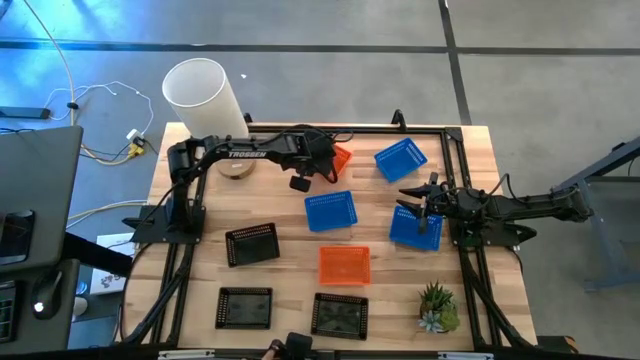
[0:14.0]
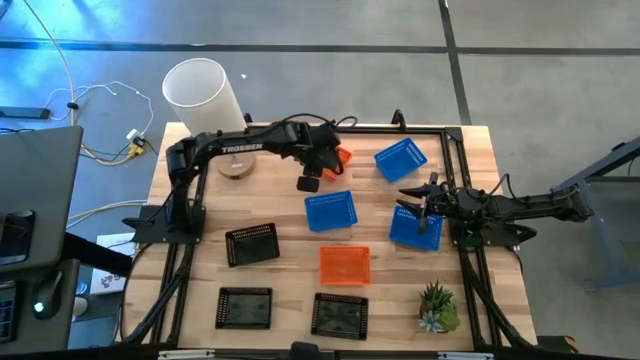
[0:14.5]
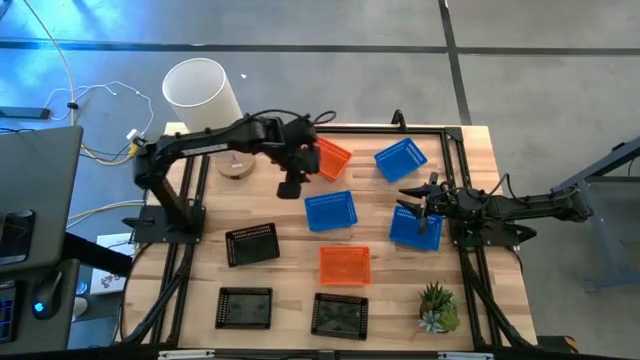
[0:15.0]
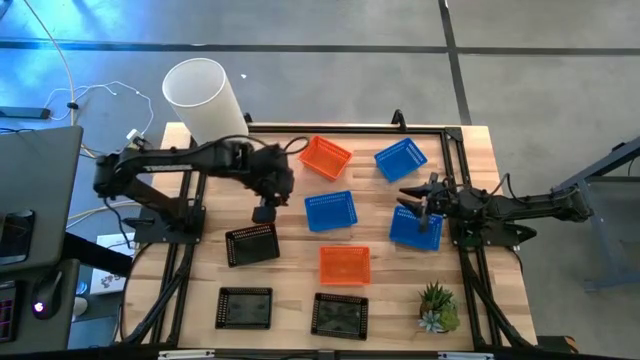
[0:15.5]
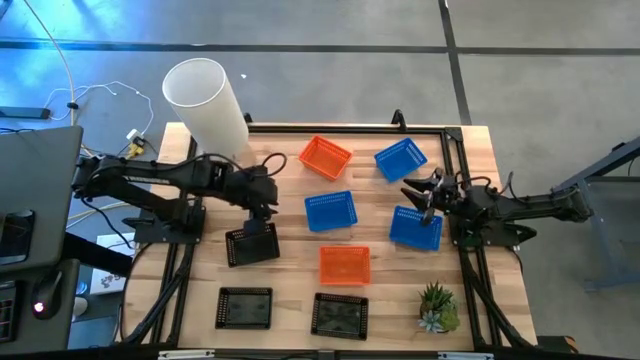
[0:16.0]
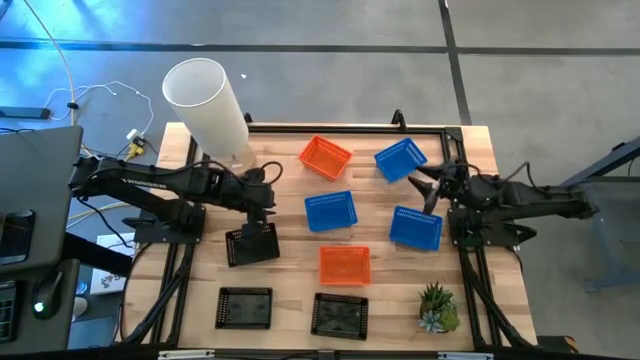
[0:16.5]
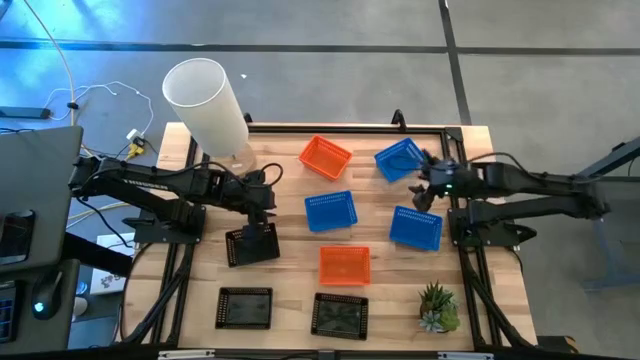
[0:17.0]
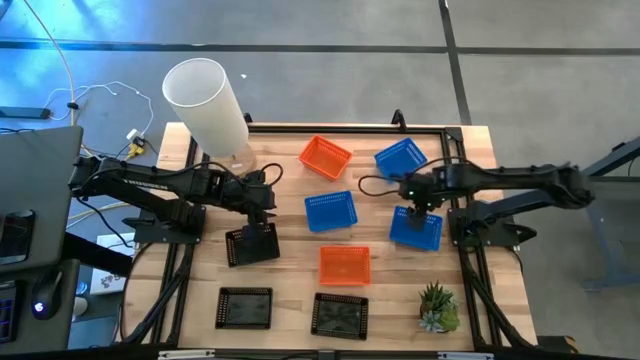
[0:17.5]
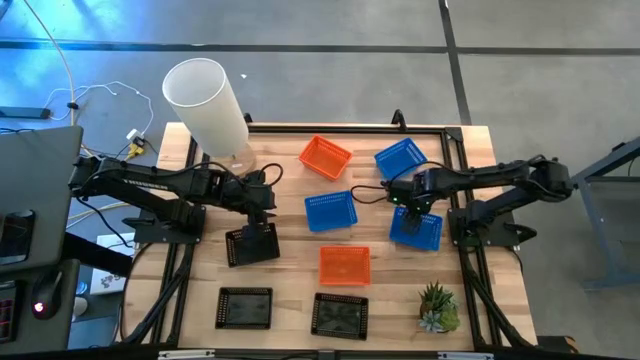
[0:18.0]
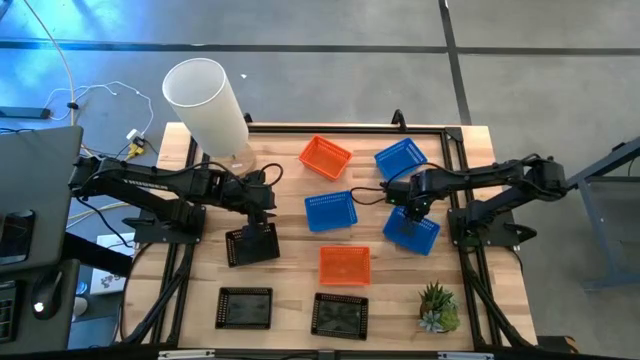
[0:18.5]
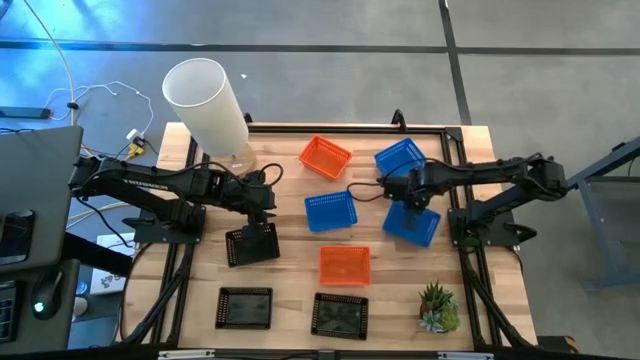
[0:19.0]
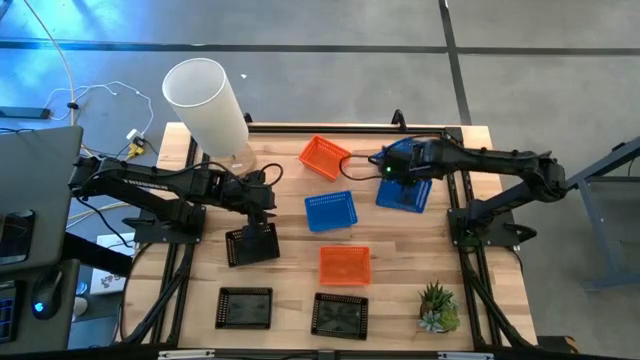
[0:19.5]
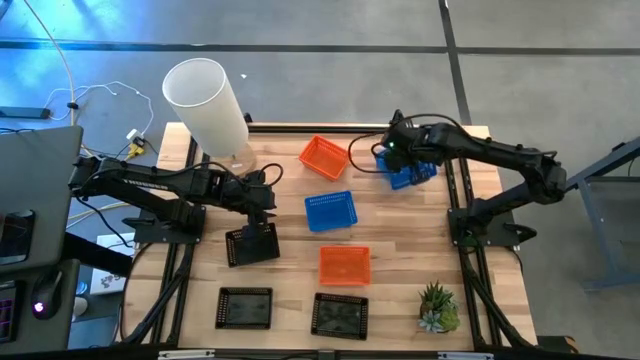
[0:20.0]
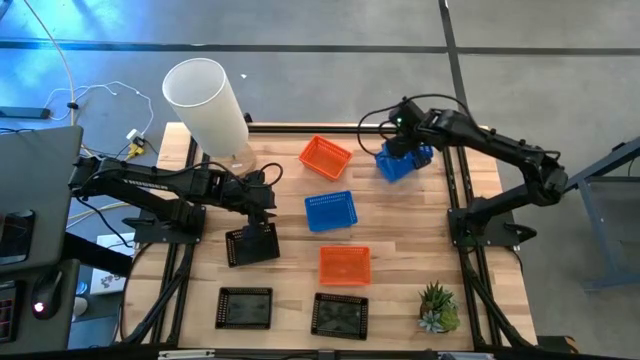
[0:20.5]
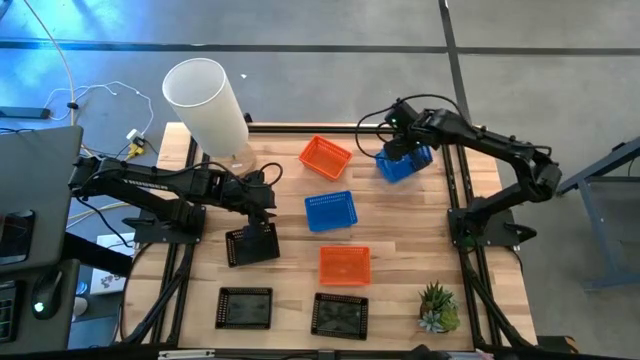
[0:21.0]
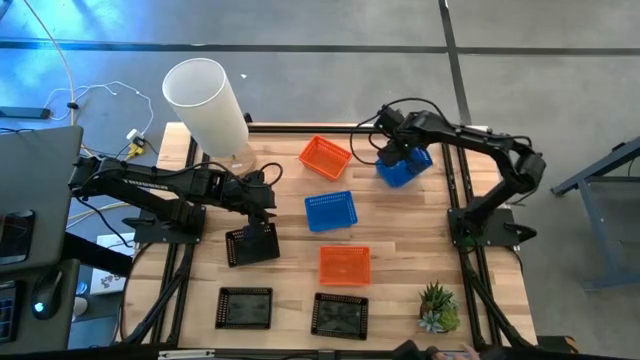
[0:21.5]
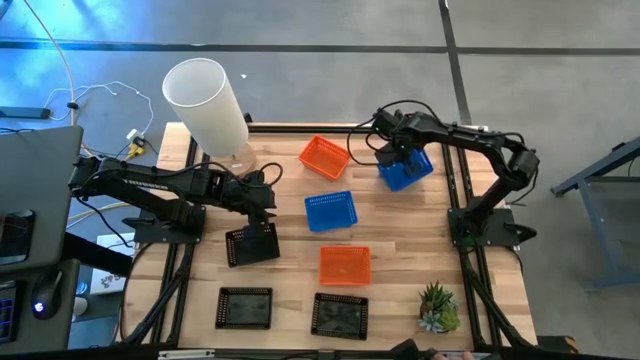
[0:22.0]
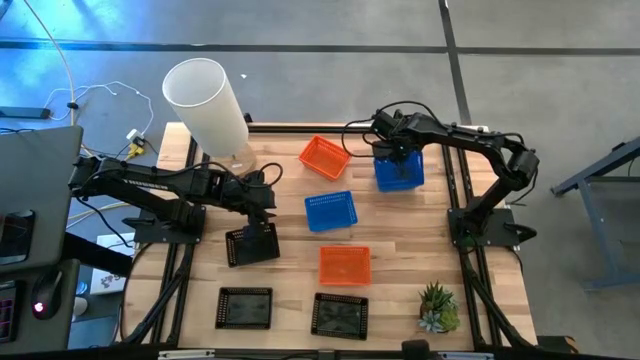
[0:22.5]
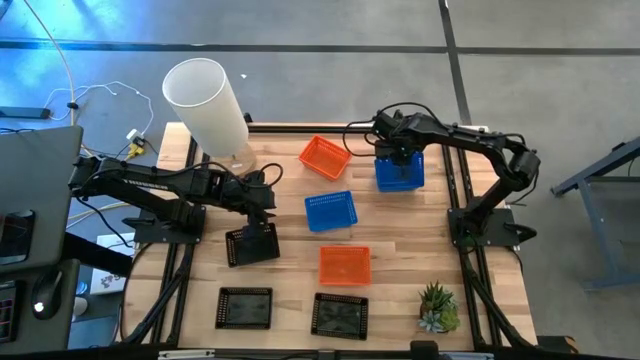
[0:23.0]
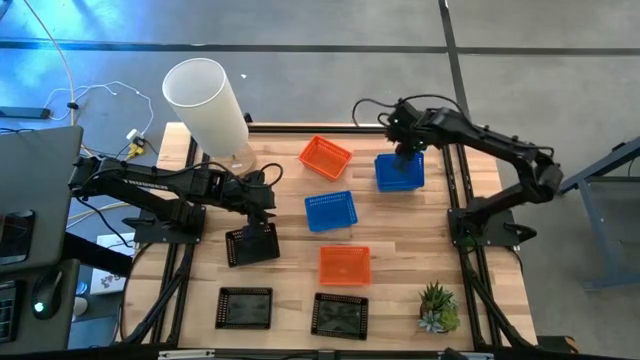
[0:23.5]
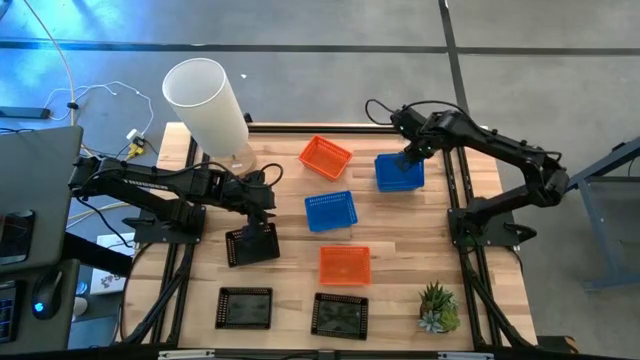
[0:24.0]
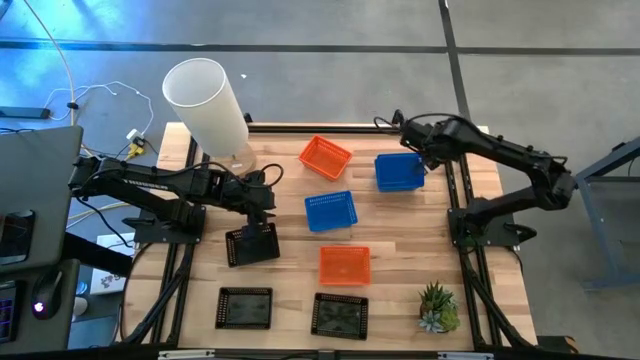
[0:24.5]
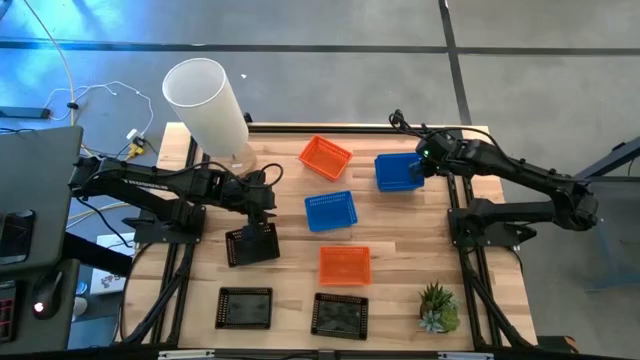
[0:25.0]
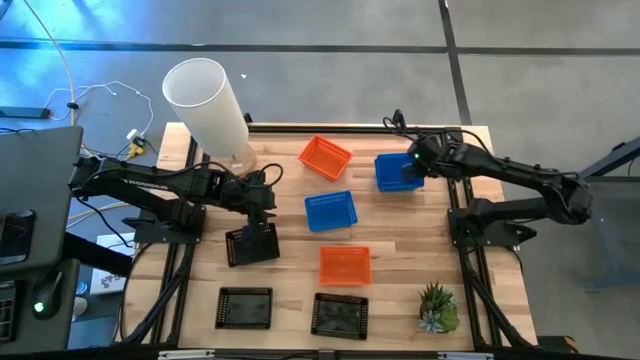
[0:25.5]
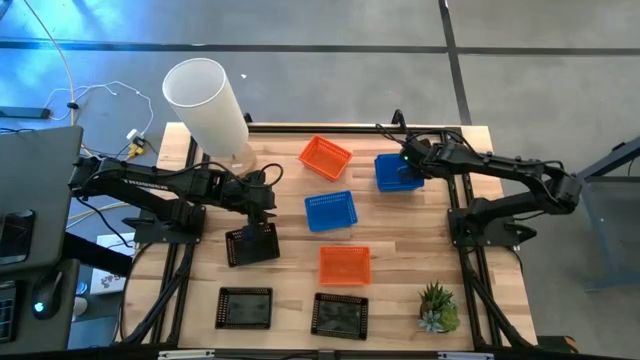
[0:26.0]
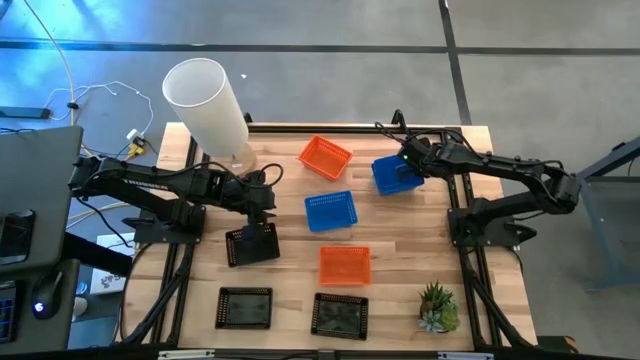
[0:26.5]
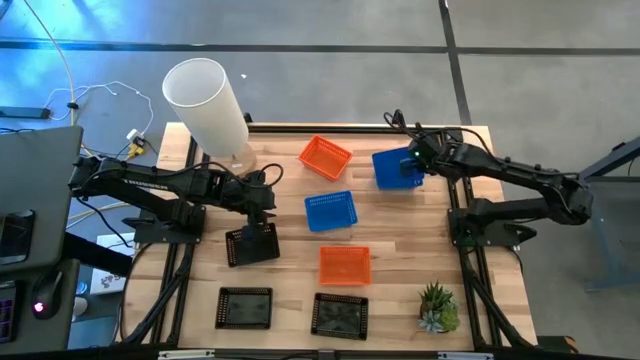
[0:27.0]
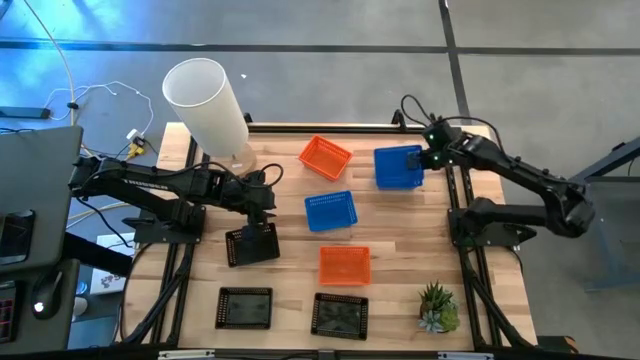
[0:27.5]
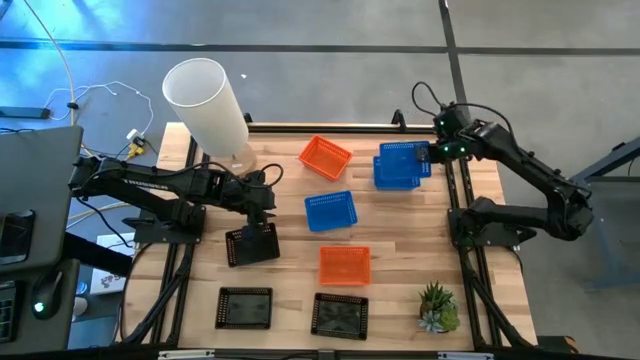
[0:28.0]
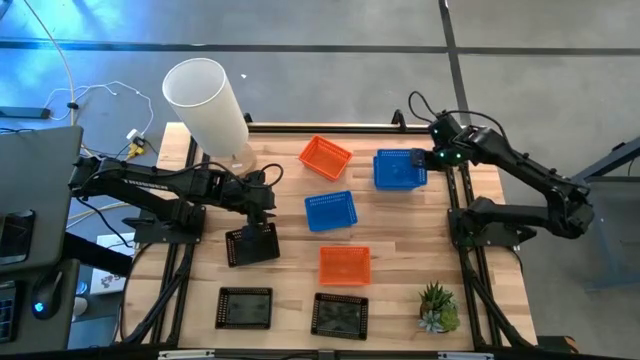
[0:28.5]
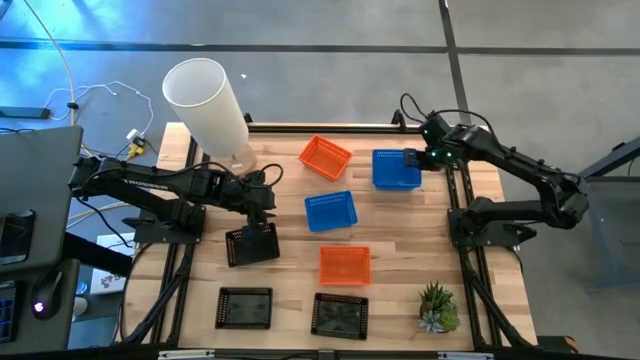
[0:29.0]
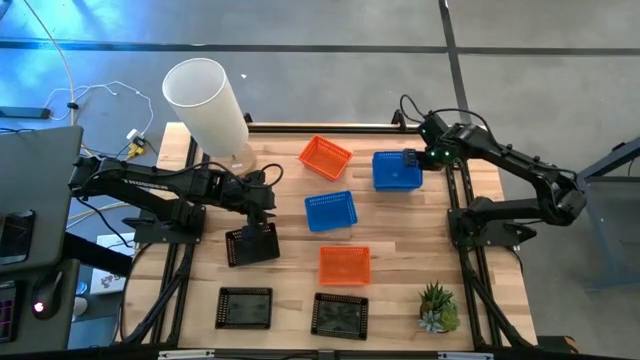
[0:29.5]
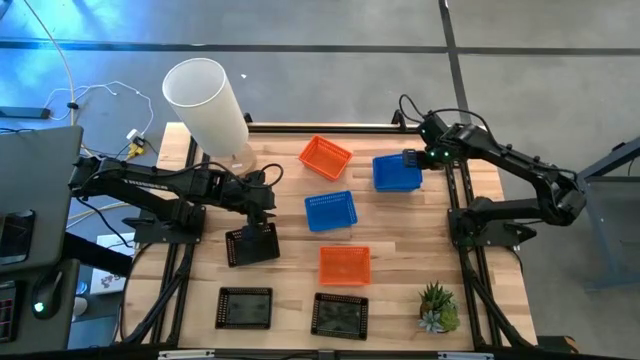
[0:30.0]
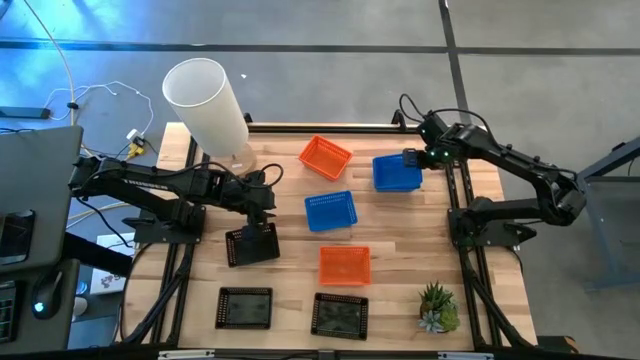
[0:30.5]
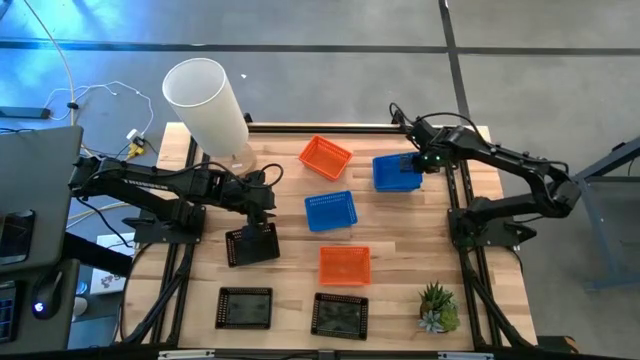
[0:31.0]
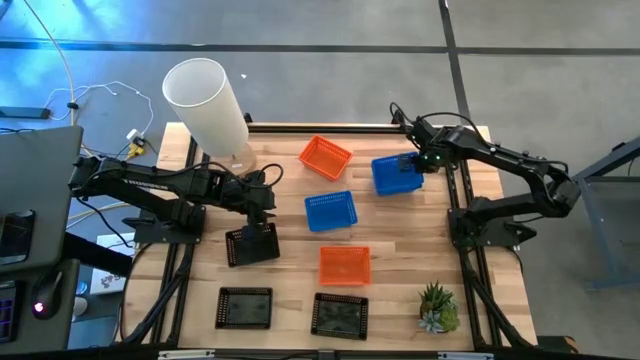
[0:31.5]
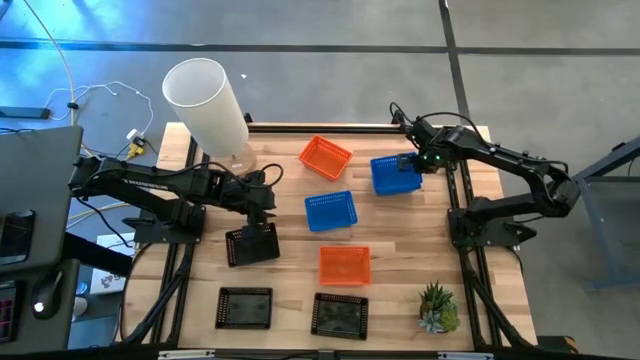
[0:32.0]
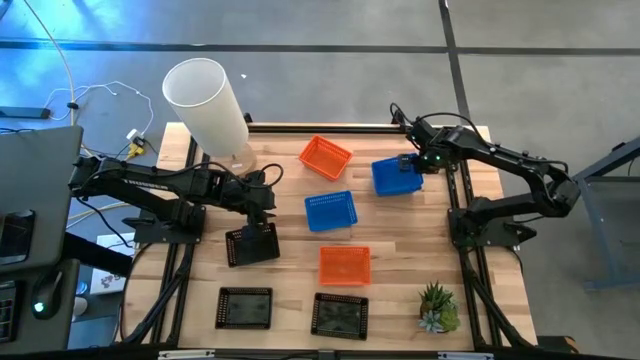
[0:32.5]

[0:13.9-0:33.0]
Stack the bottom right blue bin on top of the top blue bin
